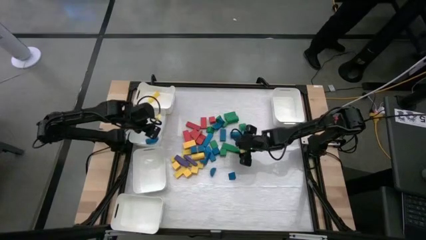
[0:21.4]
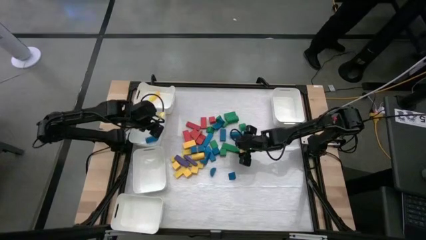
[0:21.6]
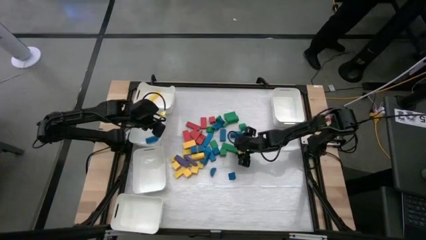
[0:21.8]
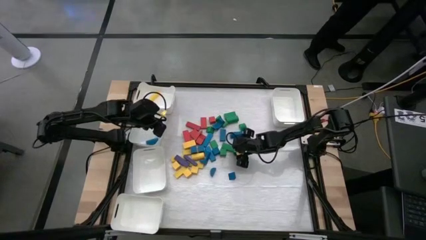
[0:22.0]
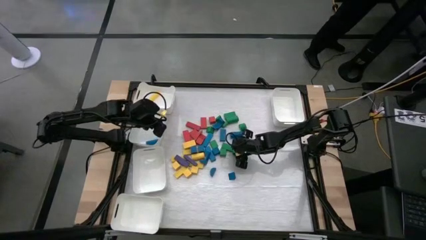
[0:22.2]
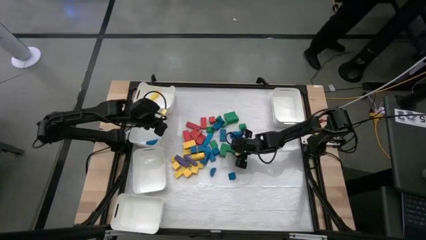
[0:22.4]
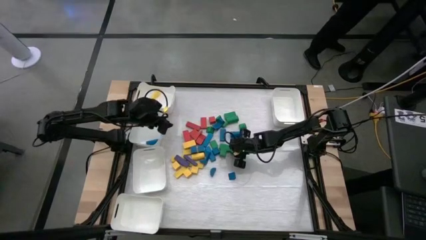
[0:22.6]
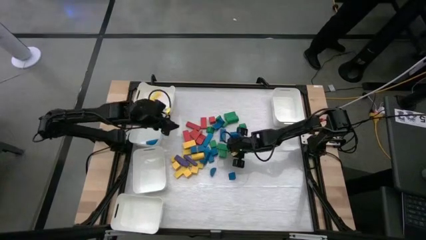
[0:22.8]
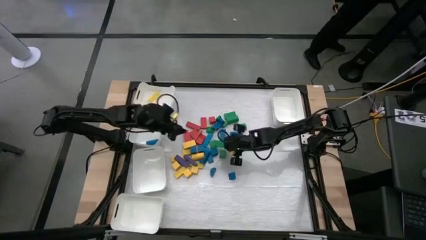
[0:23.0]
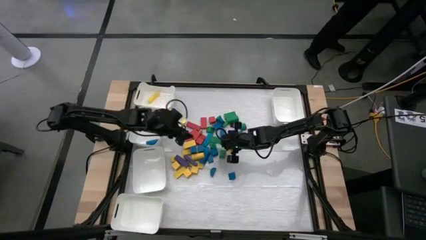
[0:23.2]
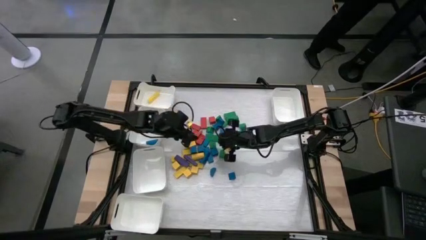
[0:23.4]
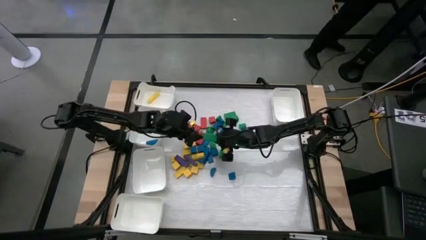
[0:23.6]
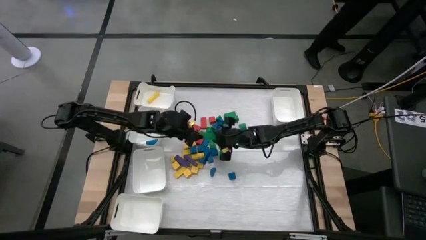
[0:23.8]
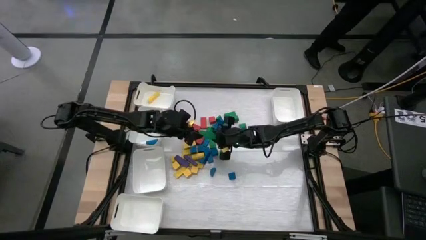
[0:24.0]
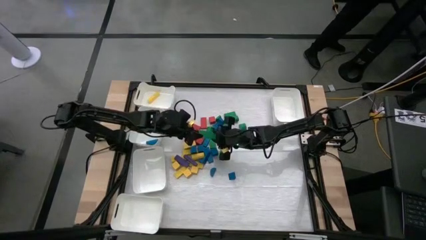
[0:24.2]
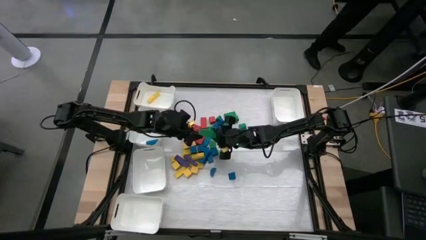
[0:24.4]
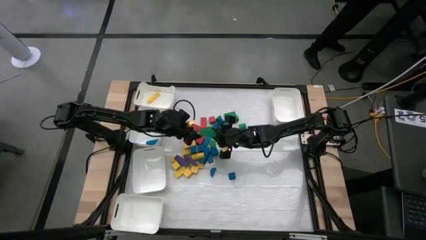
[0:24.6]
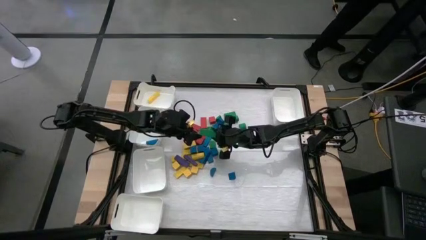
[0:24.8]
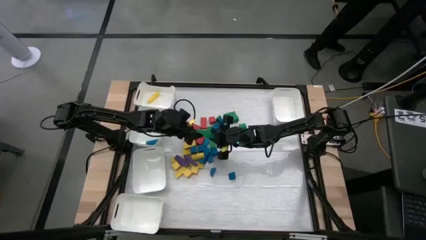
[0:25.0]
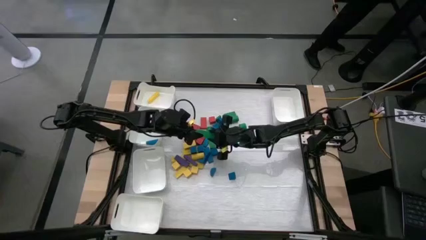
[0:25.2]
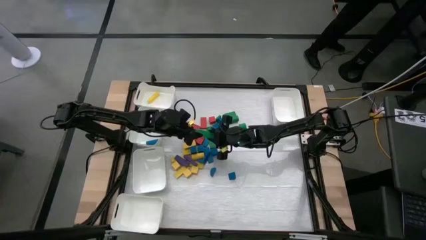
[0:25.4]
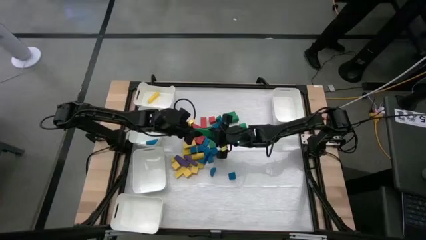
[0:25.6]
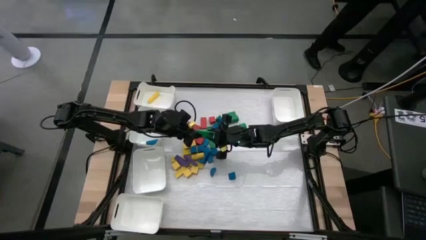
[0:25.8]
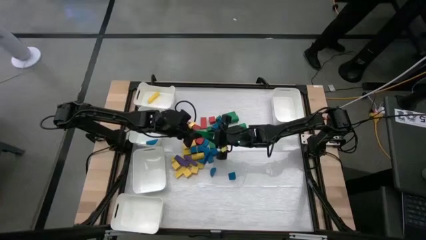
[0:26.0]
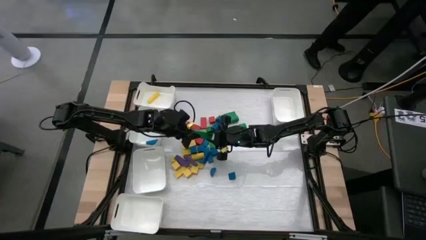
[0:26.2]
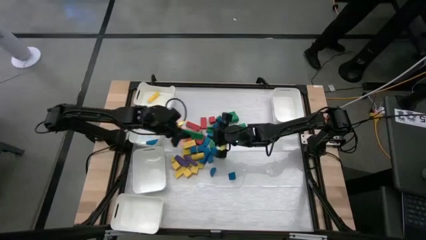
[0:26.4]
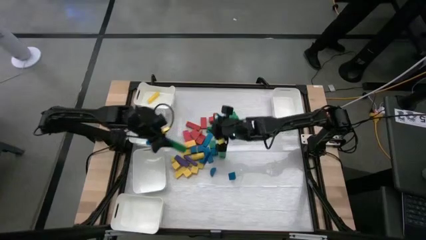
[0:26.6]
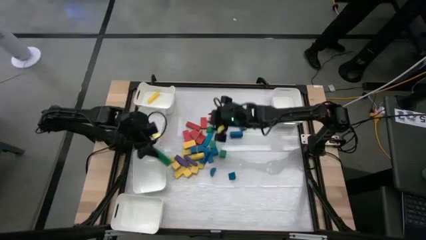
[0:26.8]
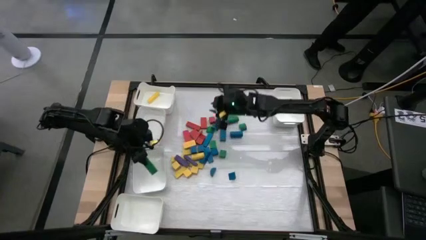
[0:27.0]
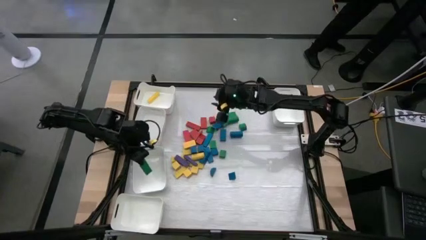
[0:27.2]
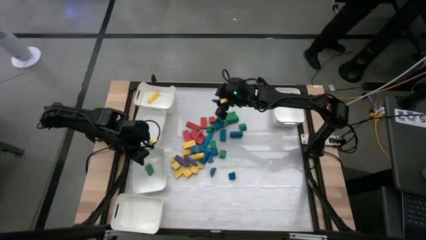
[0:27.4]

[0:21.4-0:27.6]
Task: Sort blocks
Put the green wooden block into the bottom middle left white bin

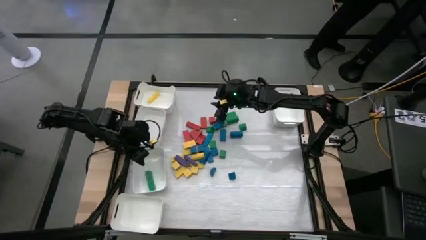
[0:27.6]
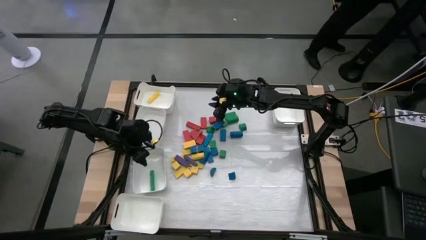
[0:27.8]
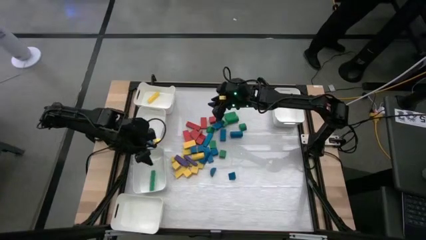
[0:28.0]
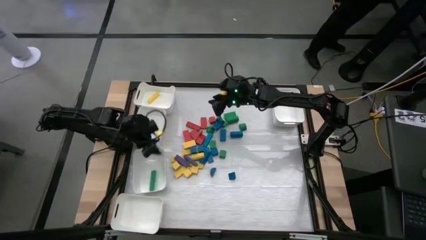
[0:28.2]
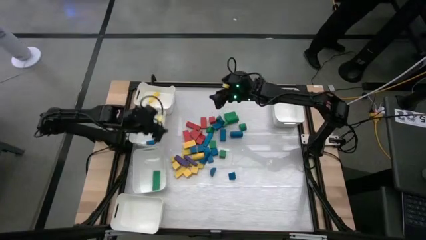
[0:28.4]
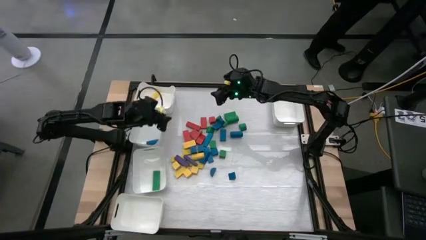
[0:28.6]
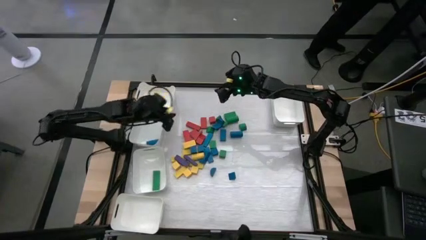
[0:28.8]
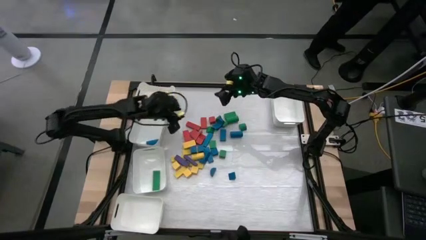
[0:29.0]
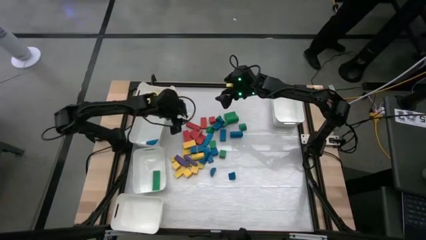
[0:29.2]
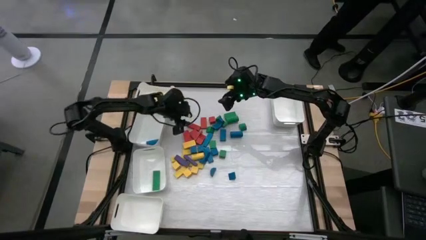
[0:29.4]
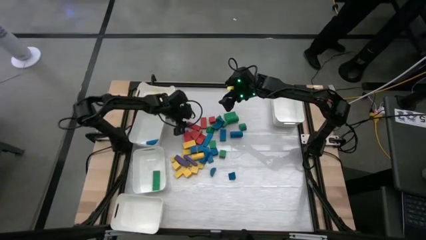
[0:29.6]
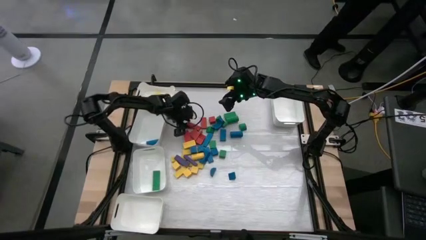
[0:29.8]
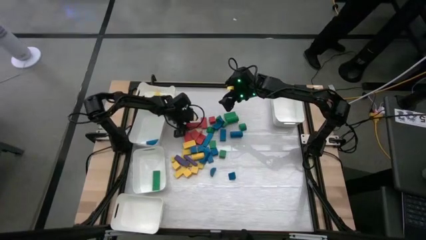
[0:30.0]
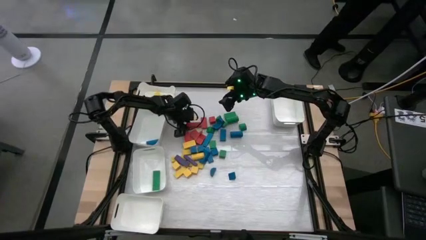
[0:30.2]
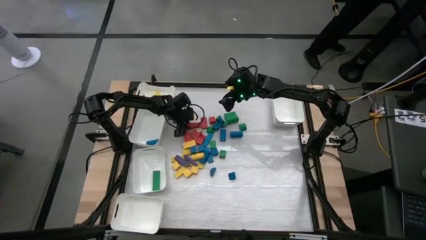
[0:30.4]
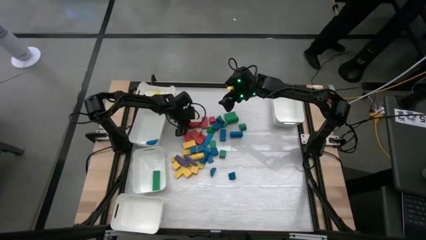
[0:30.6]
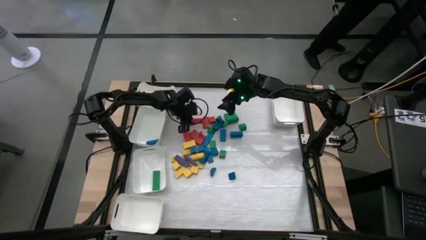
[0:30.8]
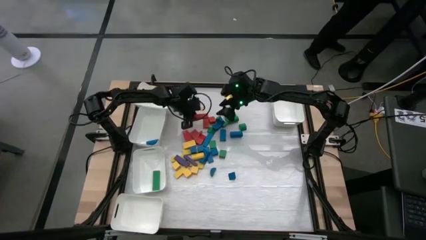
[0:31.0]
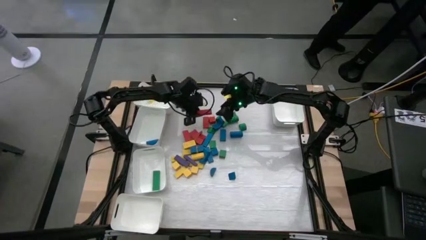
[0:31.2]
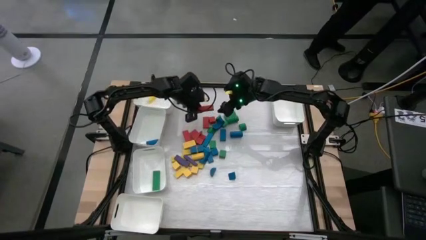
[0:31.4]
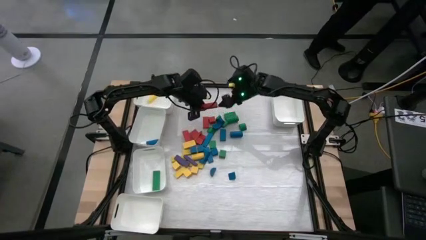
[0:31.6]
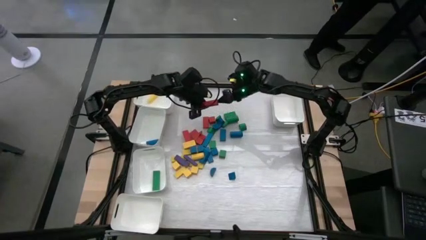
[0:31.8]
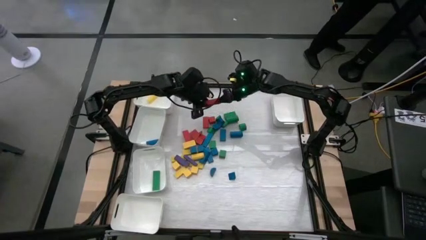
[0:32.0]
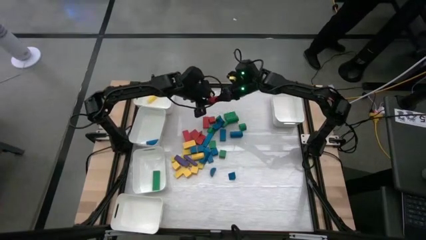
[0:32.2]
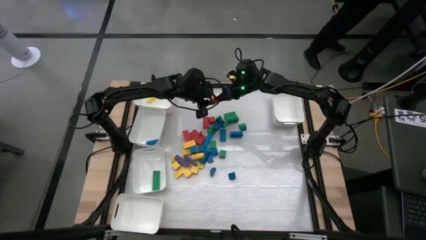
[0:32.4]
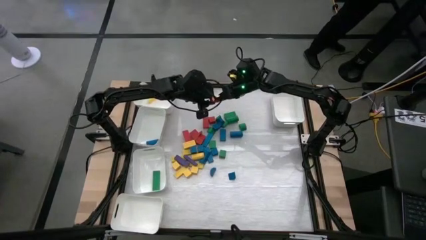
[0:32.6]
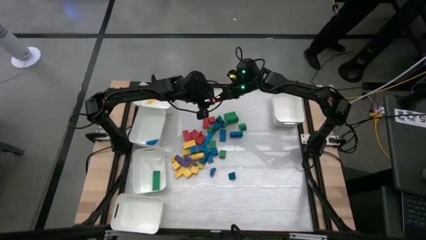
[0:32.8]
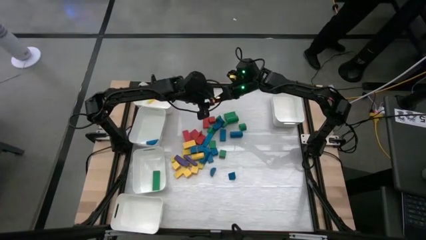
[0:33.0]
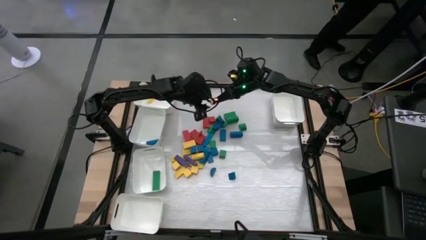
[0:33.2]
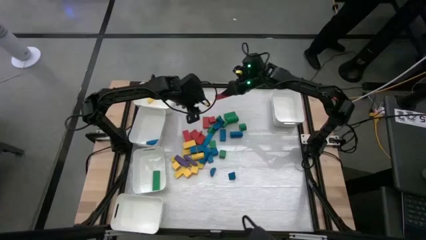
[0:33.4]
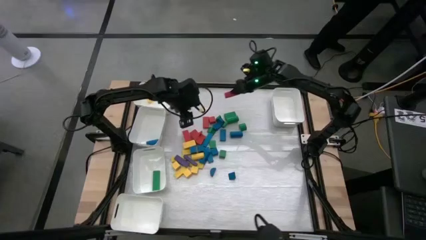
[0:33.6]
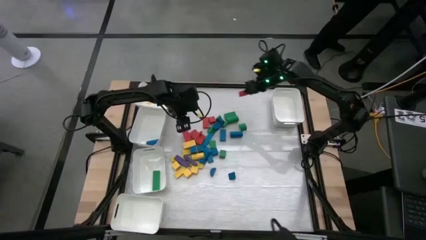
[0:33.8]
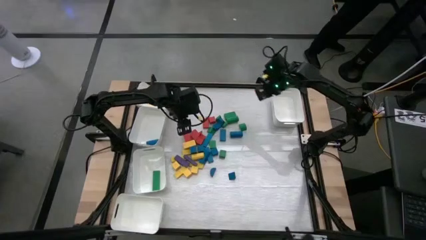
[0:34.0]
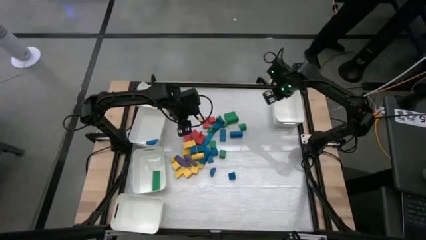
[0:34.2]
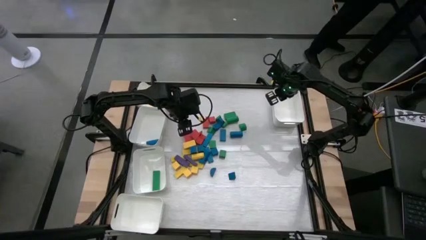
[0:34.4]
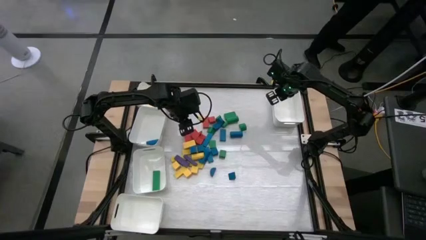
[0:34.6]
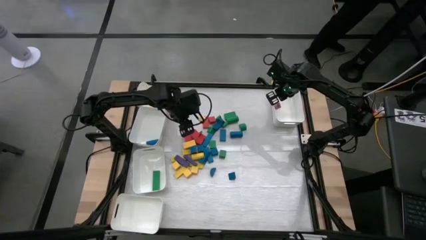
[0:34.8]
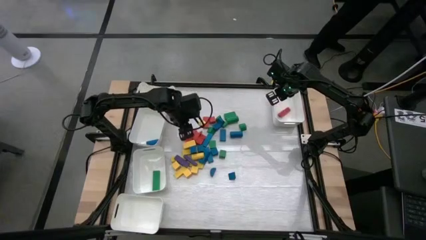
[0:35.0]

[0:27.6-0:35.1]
Put the red wooden block into the top right white bin

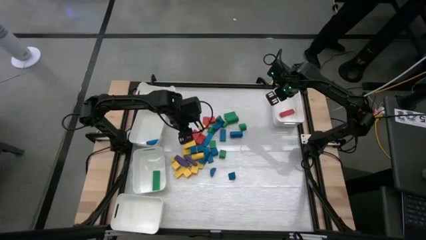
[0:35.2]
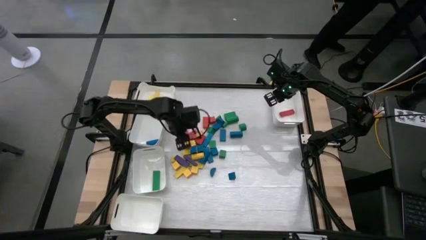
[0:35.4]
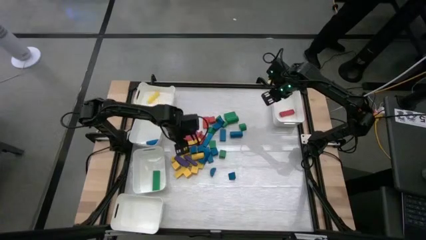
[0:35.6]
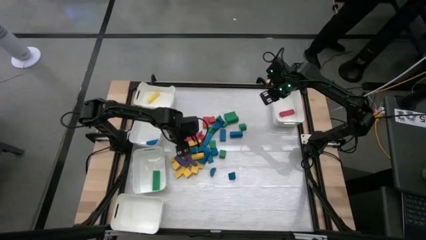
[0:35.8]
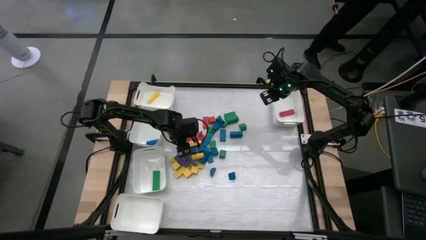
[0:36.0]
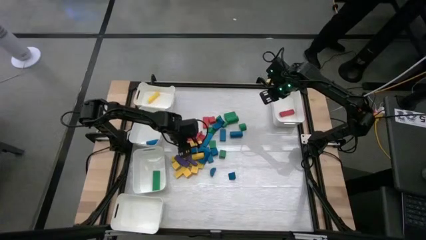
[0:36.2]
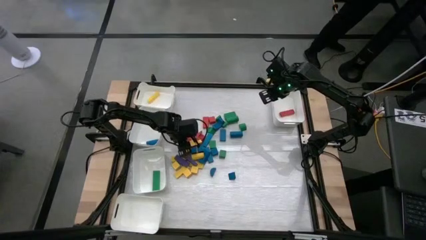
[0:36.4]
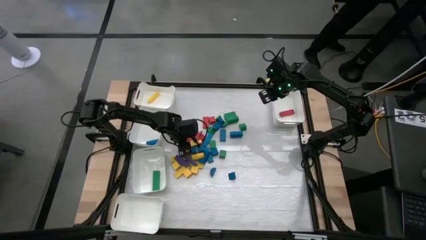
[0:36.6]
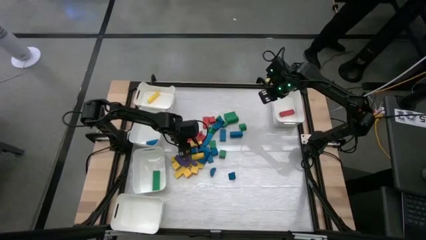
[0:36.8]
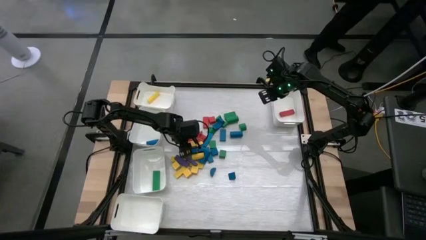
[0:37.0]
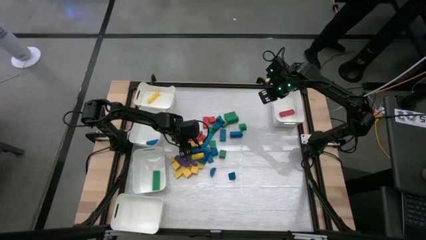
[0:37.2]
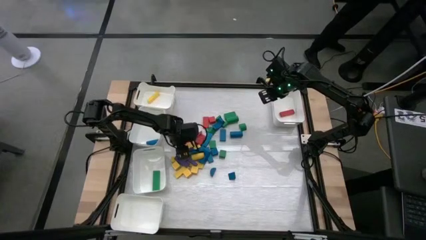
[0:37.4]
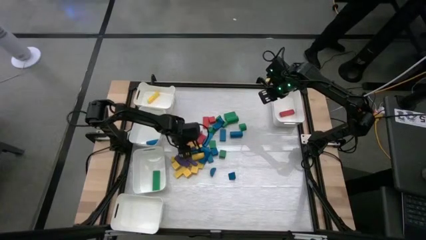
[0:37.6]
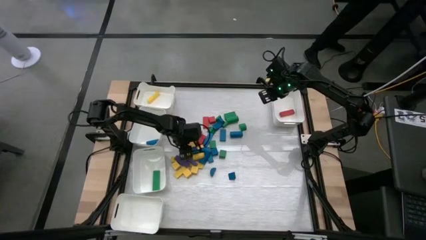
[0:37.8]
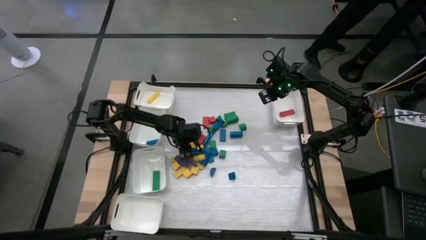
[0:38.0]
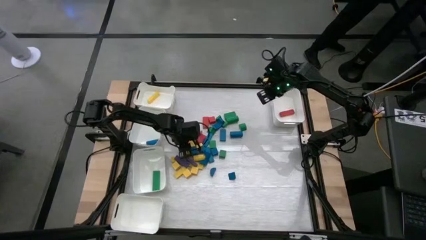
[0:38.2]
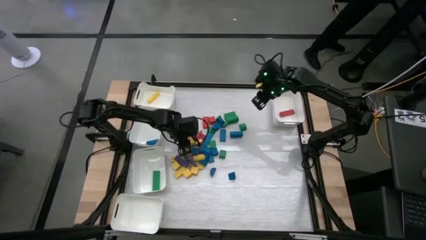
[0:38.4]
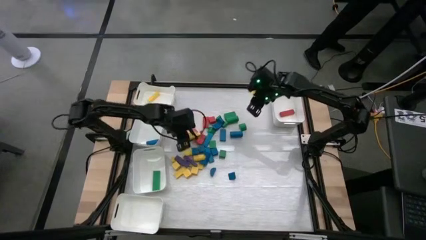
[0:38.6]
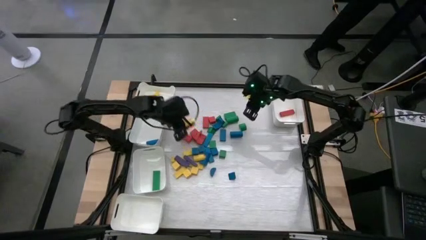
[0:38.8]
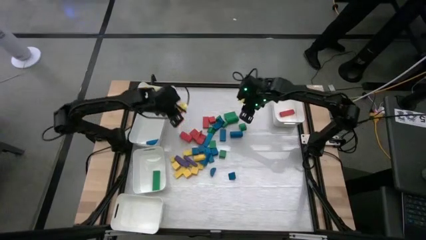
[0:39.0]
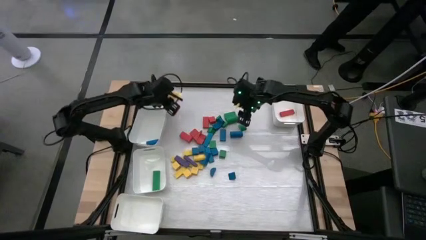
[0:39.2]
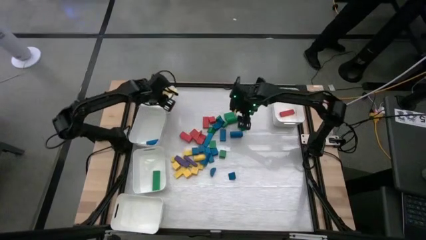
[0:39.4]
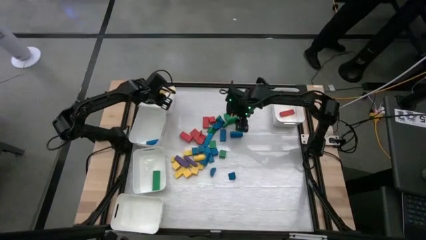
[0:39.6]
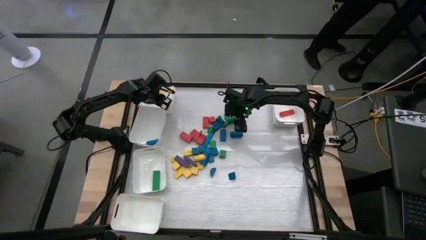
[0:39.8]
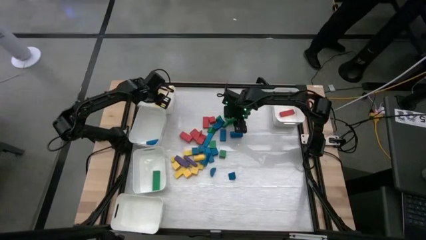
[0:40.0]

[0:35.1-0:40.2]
Put the yellow wooden block into the top left white bin
